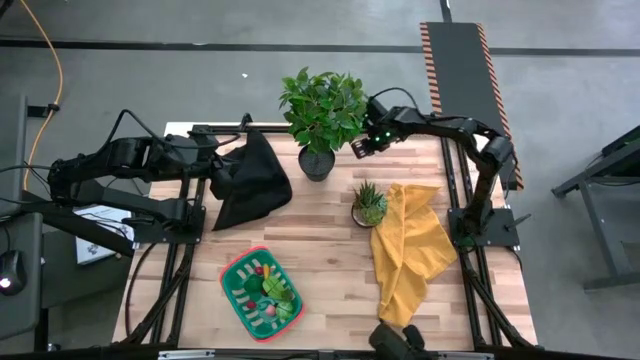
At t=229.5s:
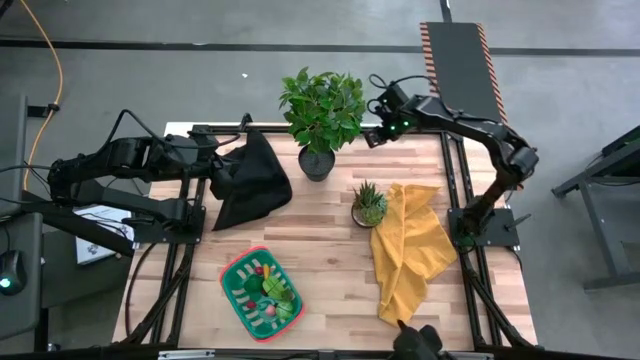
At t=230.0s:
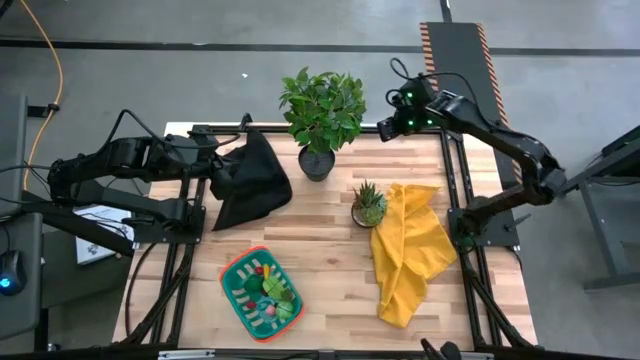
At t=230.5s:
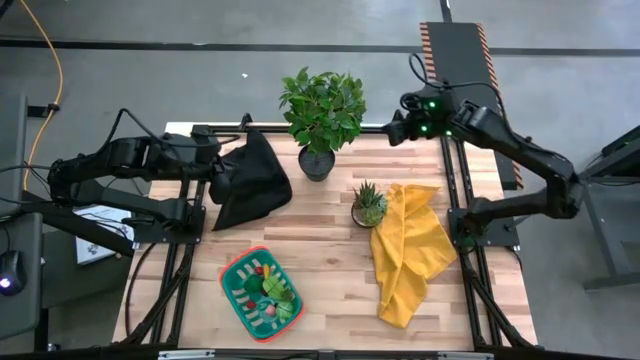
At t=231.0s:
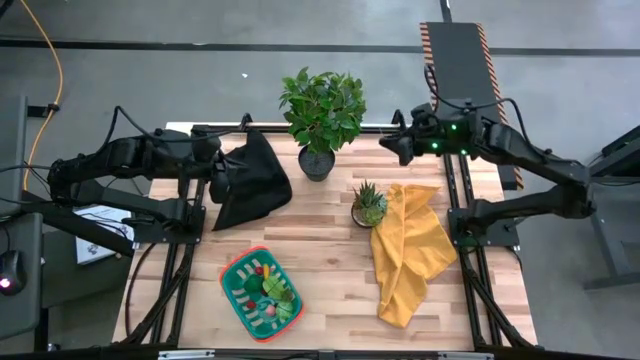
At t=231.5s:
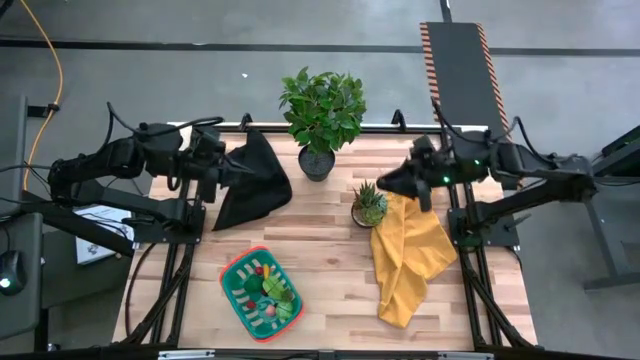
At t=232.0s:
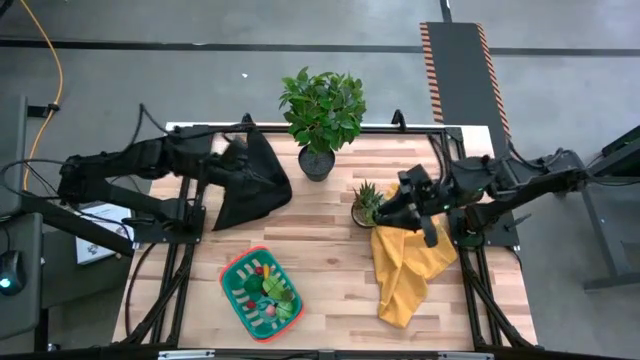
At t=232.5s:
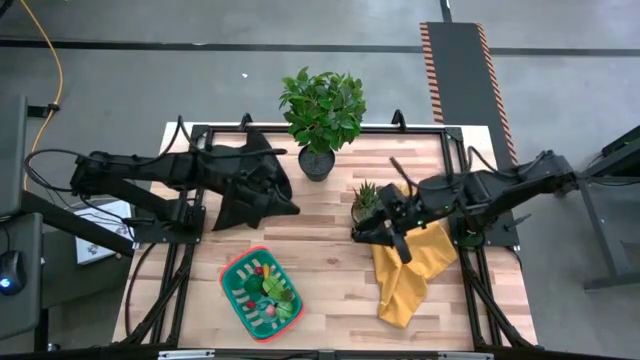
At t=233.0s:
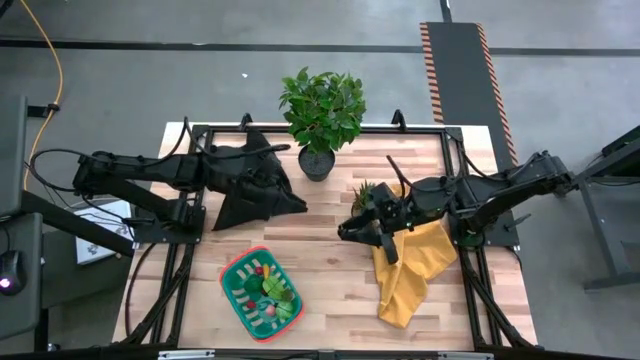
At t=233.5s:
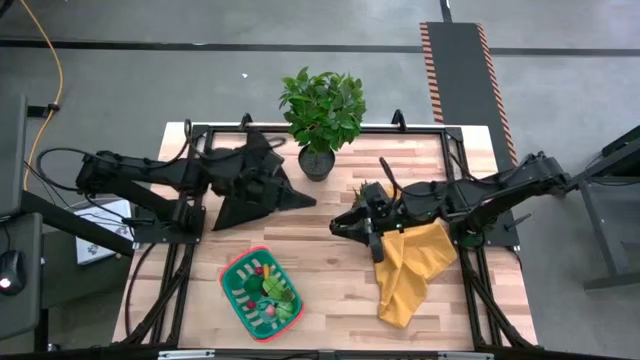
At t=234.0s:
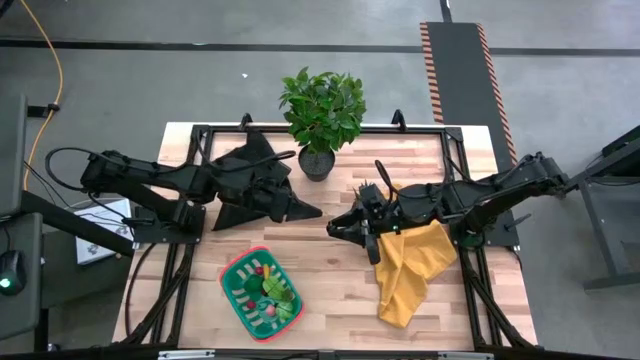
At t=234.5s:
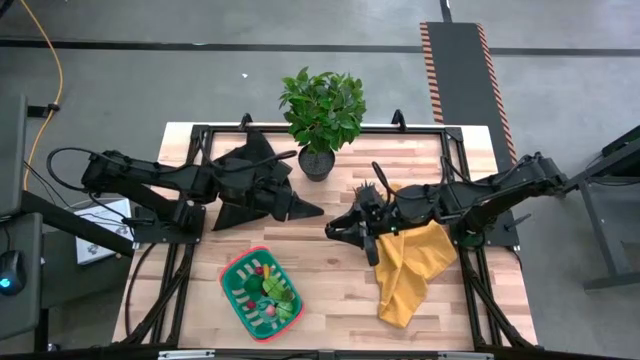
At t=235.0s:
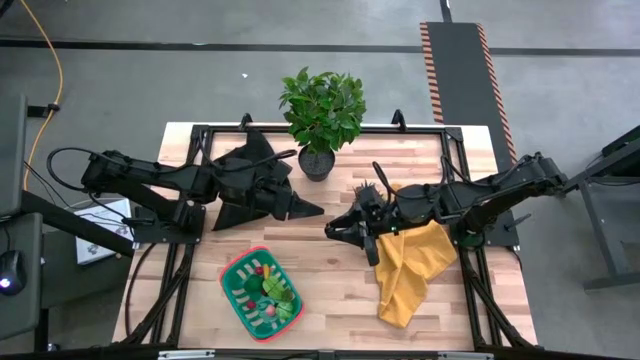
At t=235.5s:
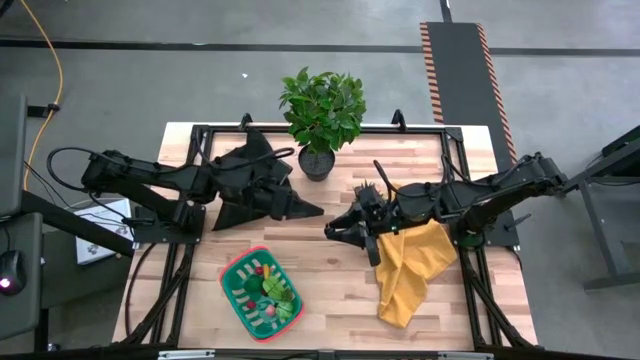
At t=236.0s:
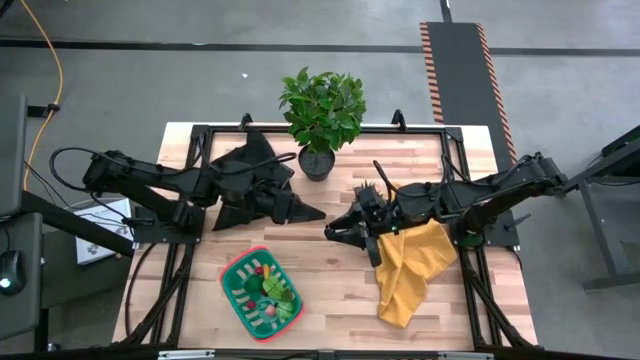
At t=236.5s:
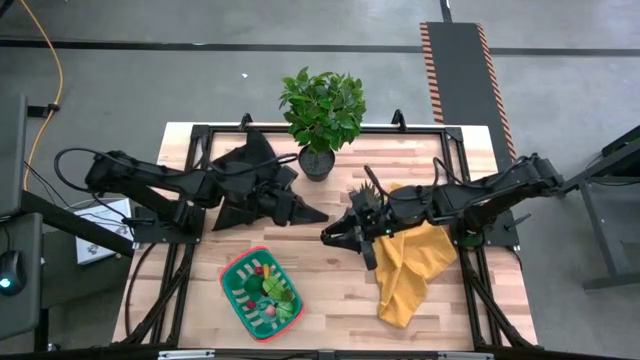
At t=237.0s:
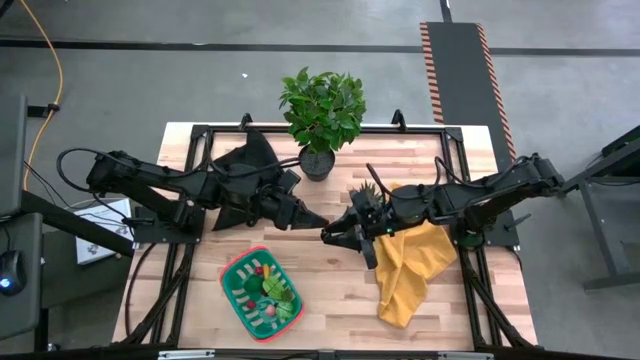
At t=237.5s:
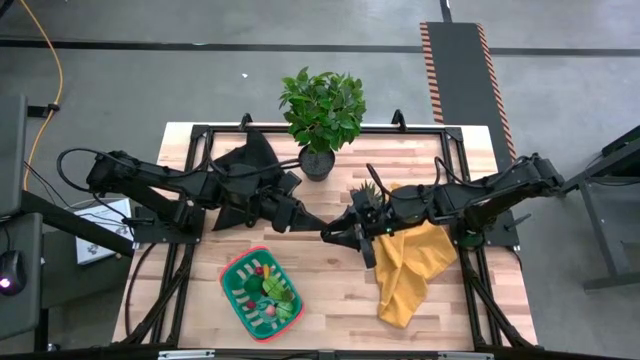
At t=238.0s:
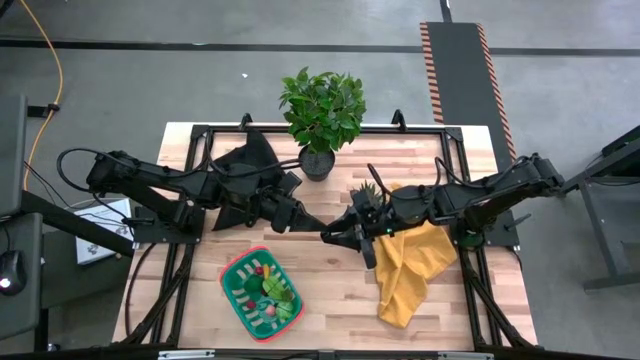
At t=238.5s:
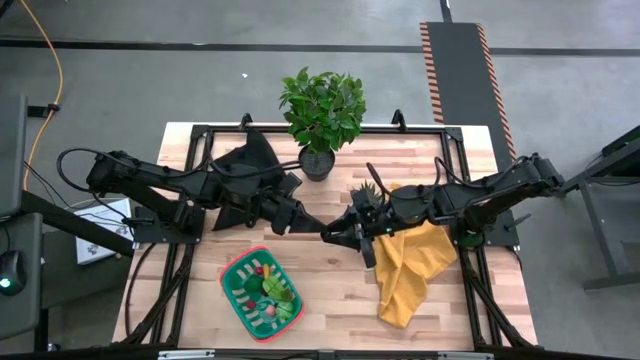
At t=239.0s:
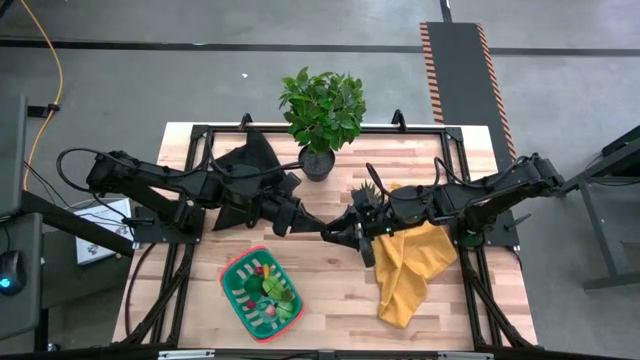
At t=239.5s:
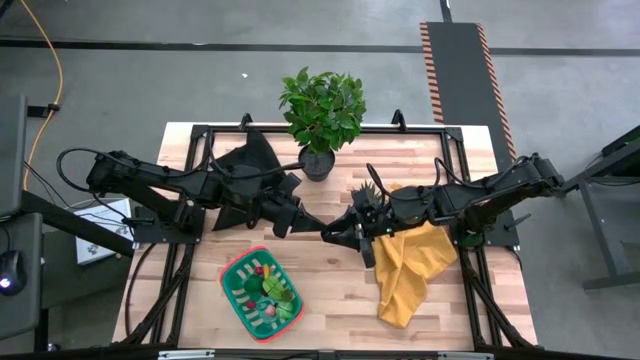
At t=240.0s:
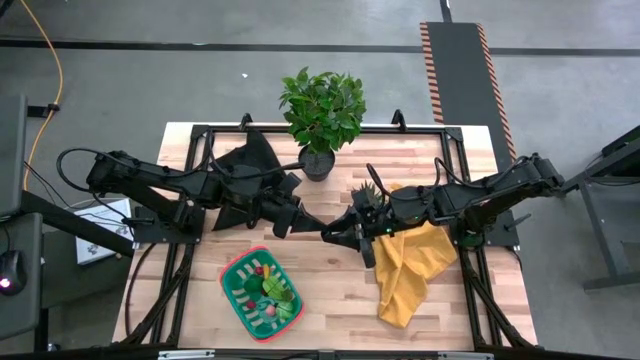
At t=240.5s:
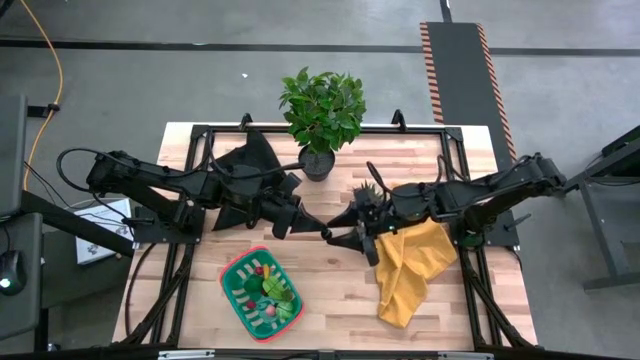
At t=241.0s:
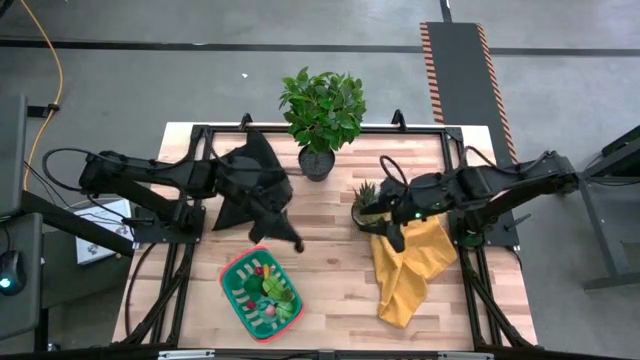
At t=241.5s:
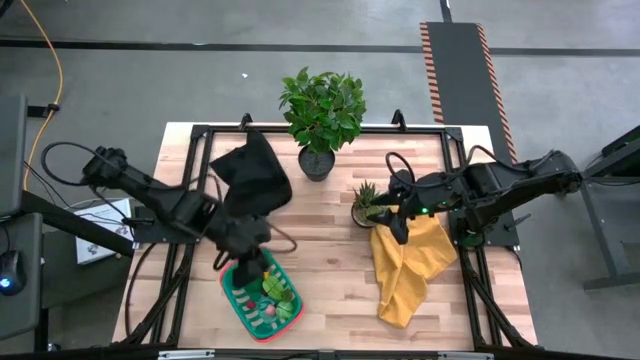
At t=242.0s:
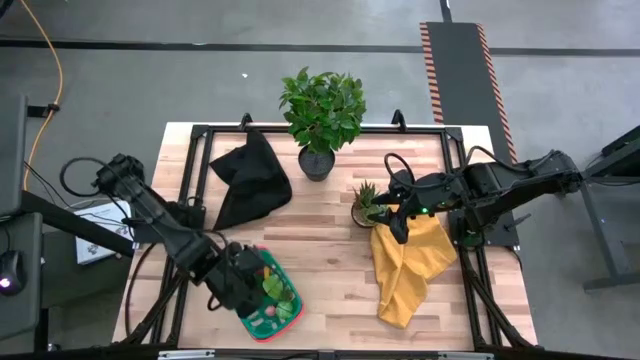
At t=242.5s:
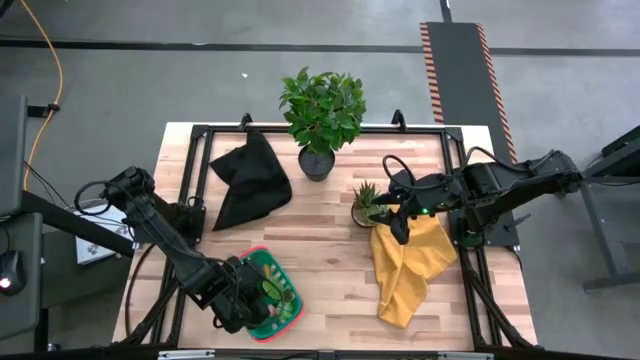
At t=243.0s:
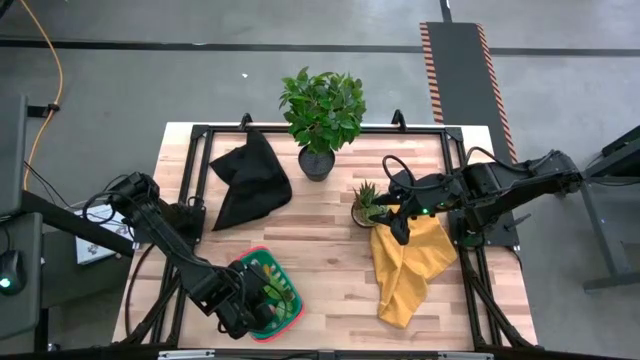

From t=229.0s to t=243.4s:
Task: Pick and placing Produce into tupperware
Put the black cherry into the blue basket

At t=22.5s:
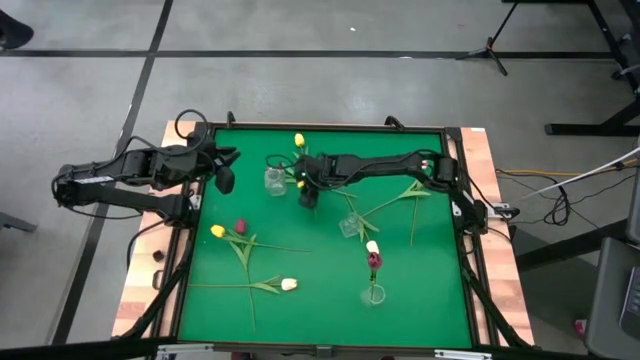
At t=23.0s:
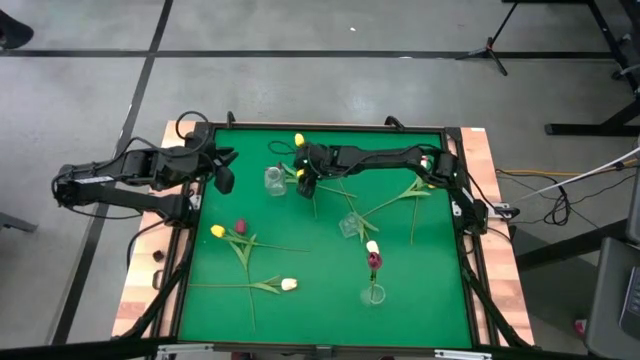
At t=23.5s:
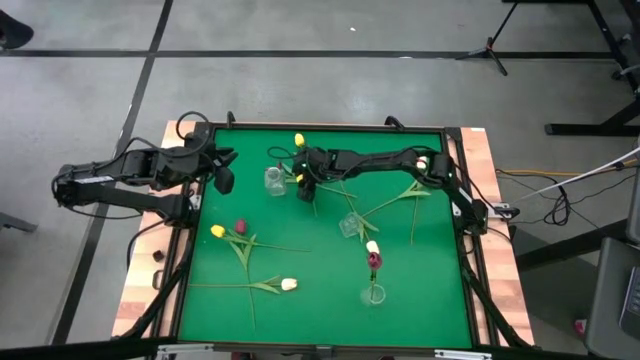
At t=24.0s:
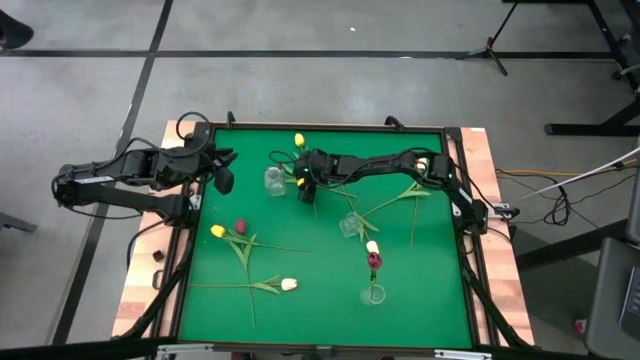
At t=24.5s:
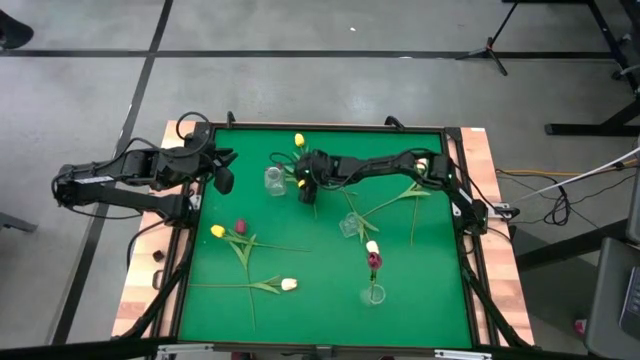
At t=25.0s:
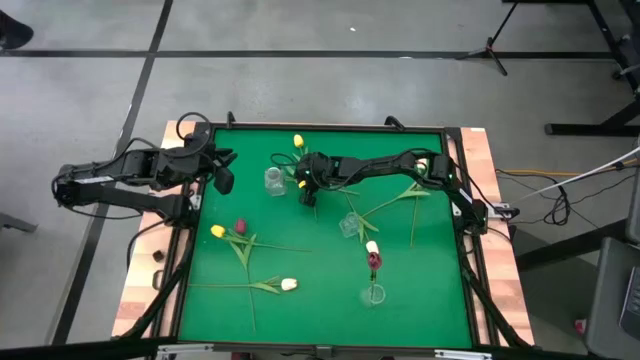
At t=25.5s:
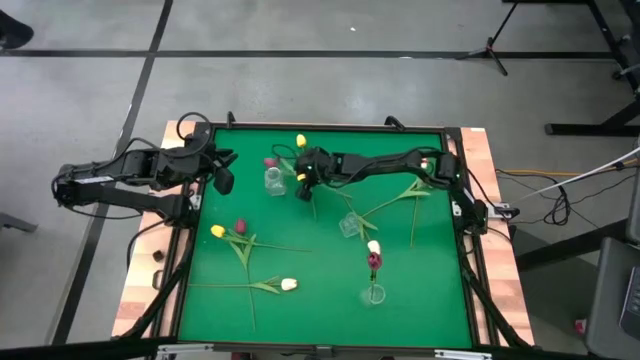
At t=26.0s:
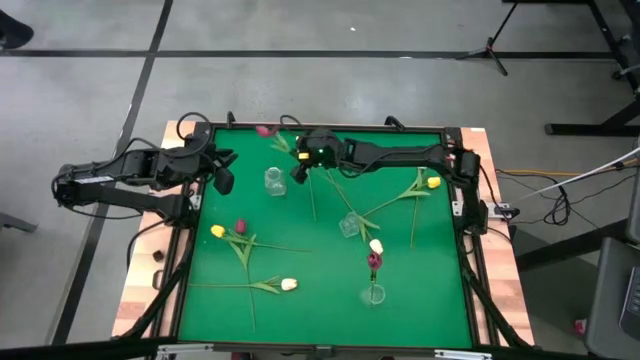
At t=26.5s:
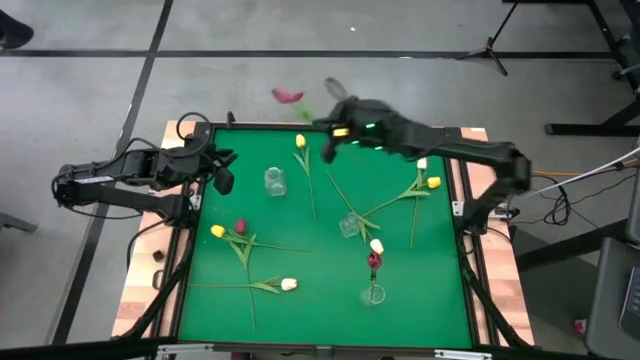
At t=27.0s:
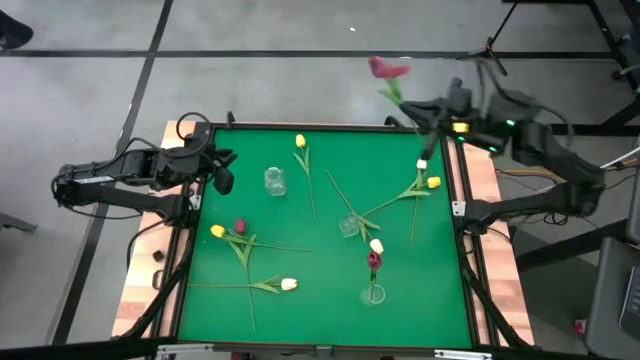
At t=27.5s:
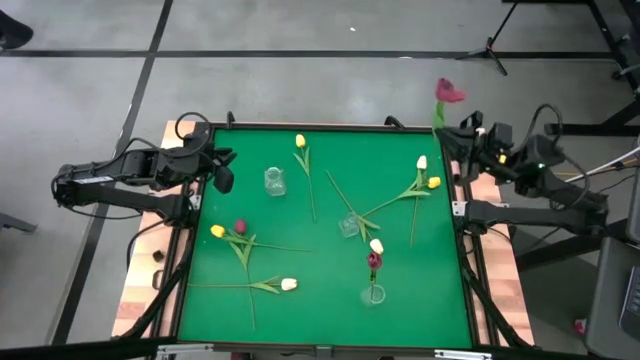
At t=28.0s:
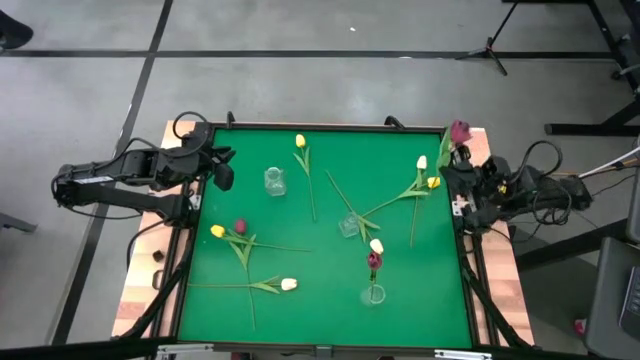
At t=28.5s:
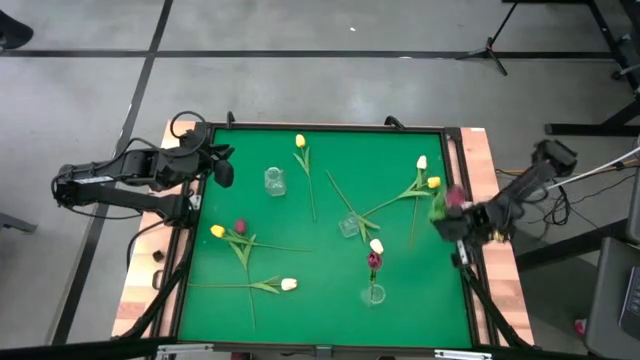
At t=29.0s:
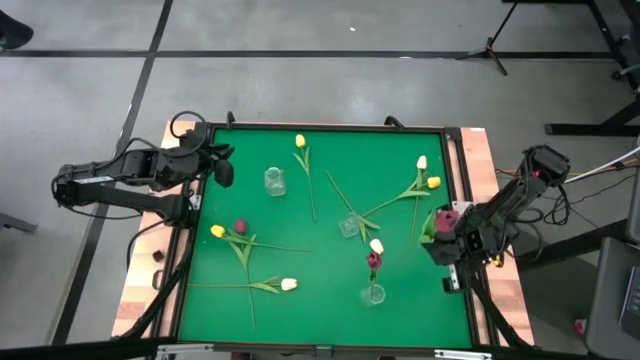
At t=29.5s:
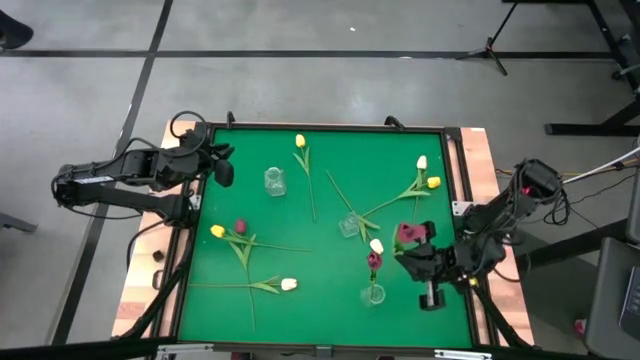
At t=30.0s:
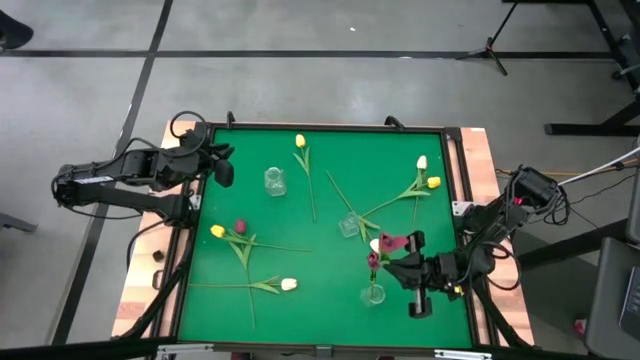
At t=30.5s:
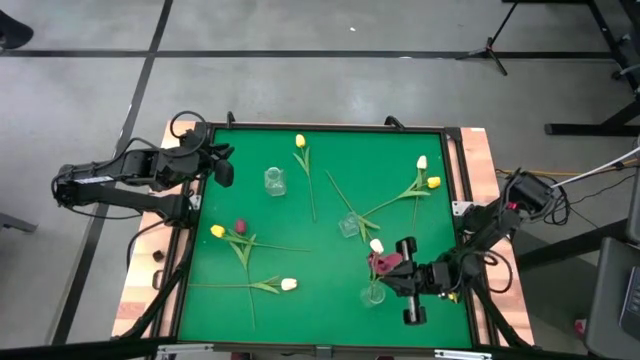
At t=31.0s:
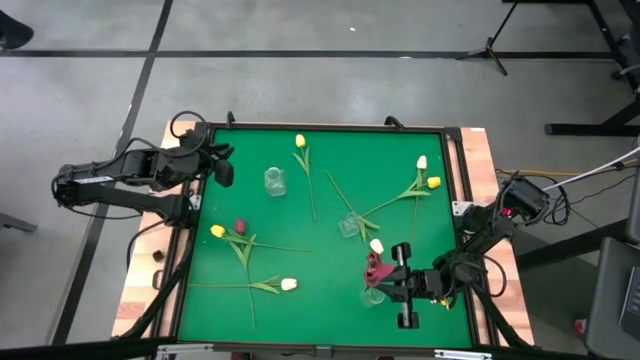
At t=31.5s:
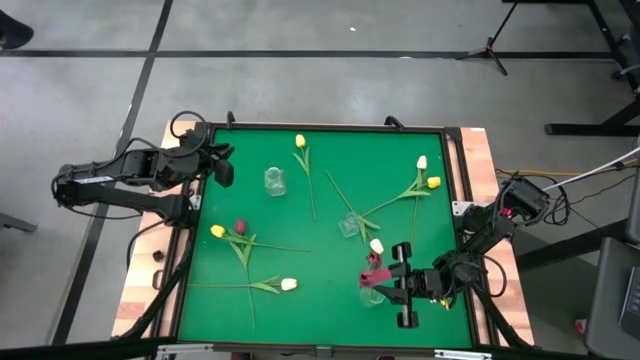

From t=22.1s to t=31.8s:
Task: Sort flowers into vase by color
Put the top red tulip into the bottom right transparent vase
